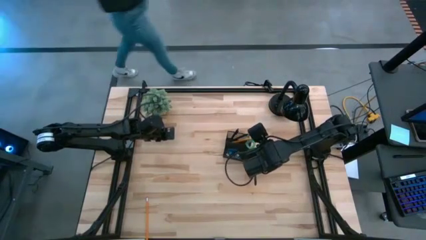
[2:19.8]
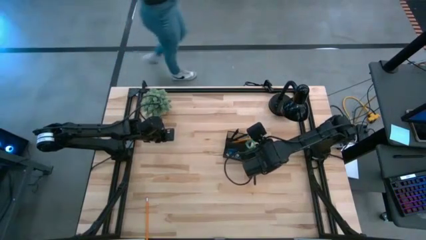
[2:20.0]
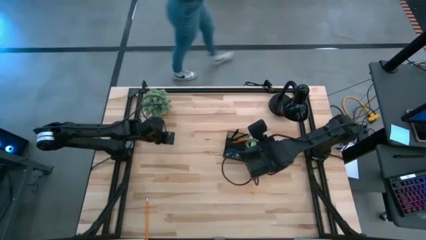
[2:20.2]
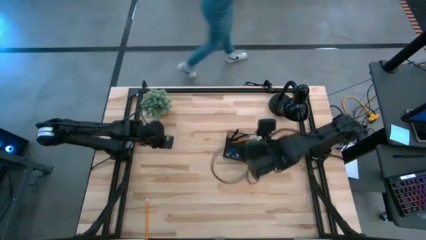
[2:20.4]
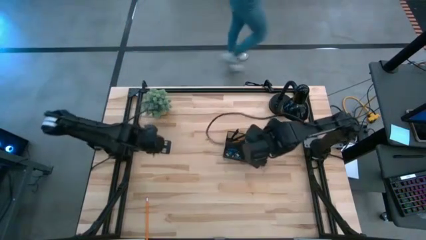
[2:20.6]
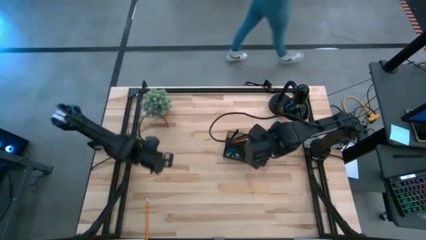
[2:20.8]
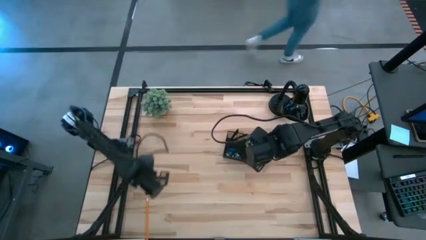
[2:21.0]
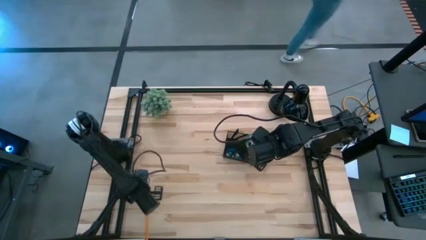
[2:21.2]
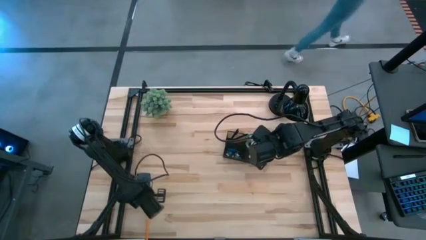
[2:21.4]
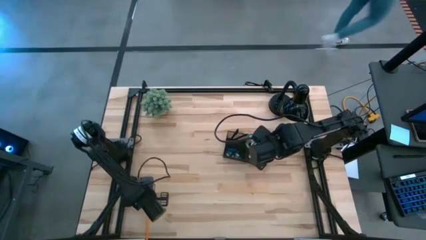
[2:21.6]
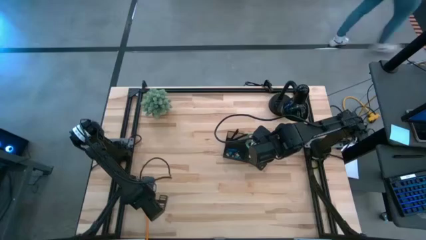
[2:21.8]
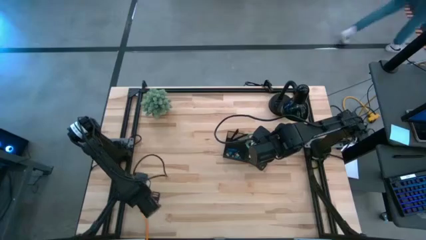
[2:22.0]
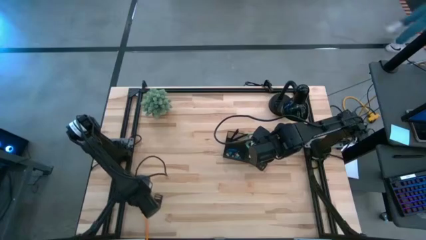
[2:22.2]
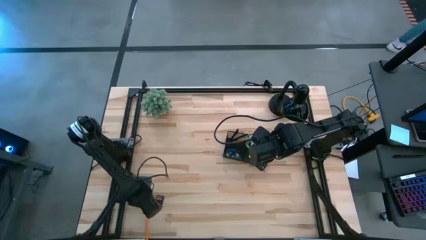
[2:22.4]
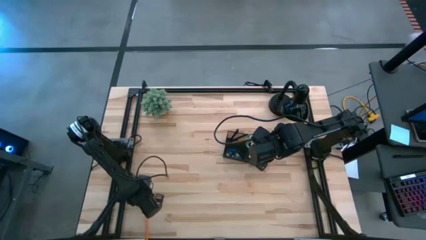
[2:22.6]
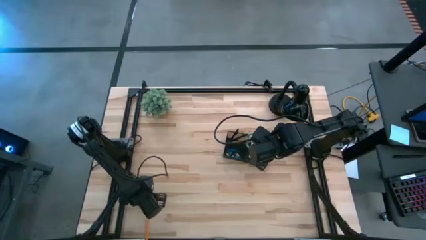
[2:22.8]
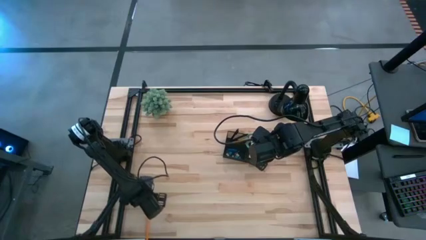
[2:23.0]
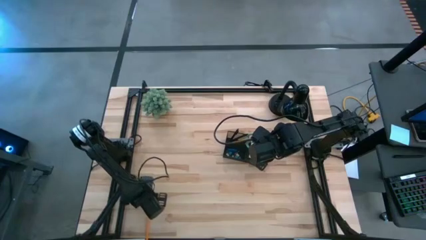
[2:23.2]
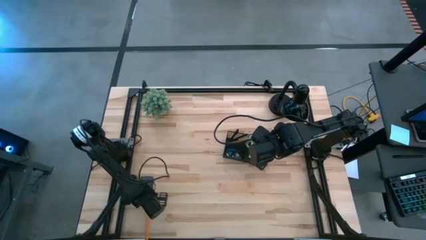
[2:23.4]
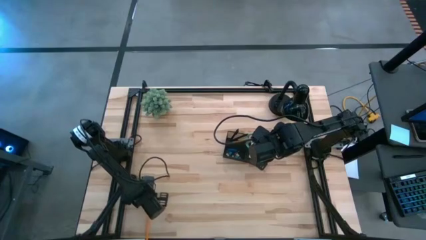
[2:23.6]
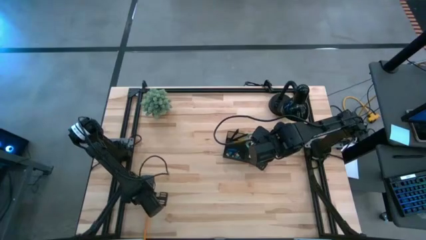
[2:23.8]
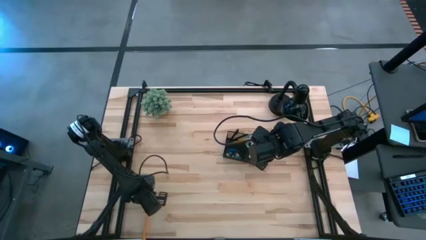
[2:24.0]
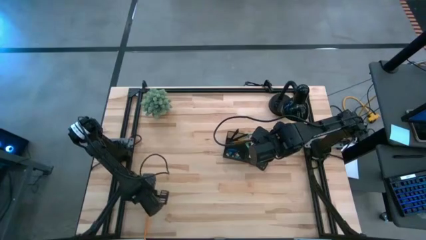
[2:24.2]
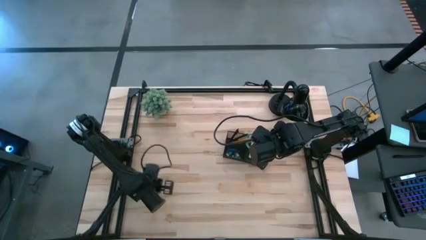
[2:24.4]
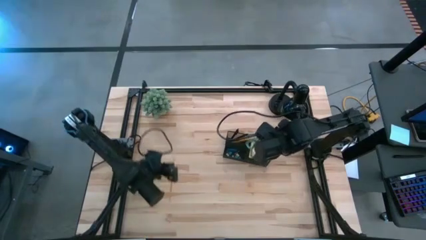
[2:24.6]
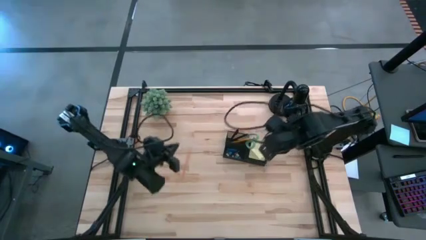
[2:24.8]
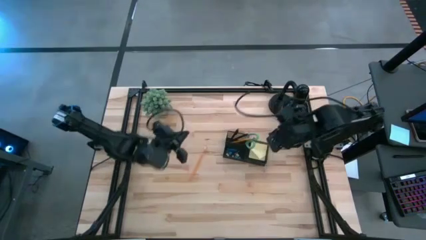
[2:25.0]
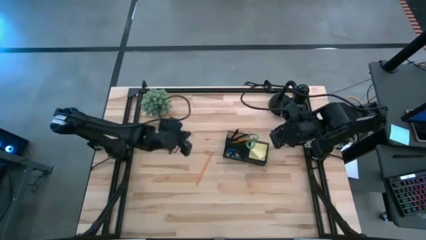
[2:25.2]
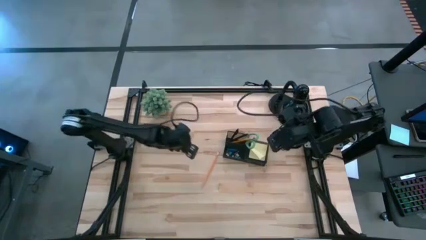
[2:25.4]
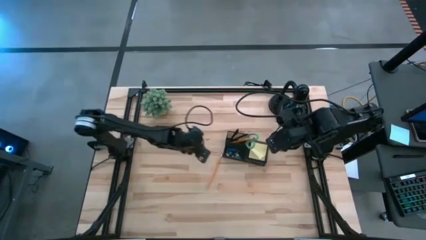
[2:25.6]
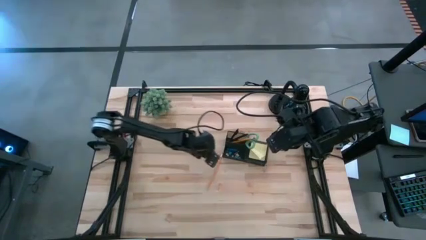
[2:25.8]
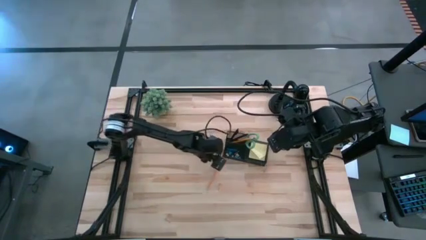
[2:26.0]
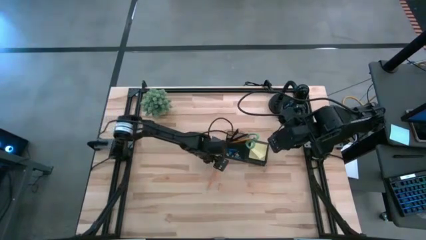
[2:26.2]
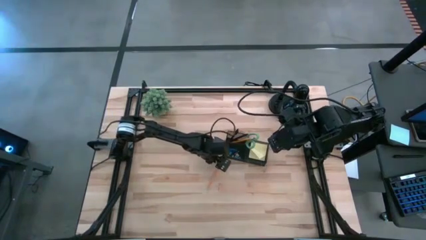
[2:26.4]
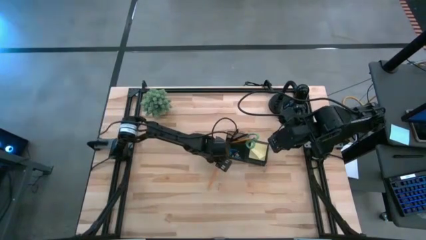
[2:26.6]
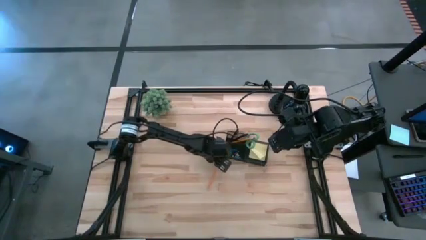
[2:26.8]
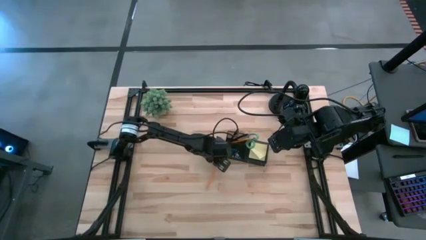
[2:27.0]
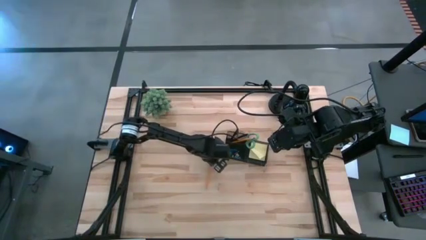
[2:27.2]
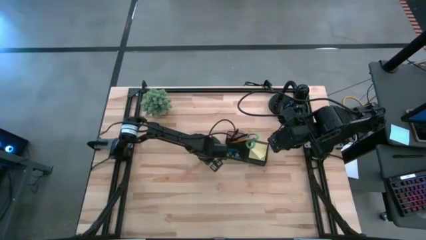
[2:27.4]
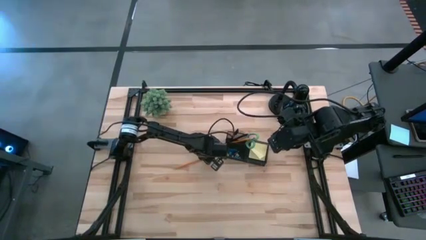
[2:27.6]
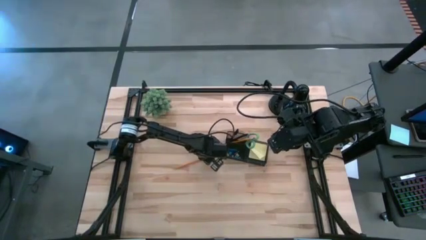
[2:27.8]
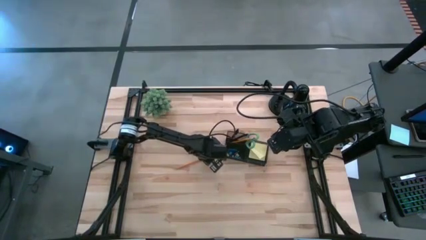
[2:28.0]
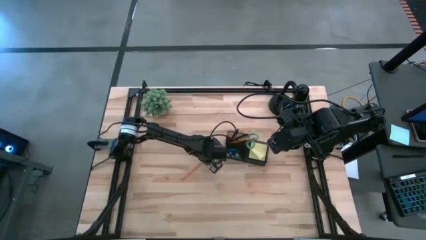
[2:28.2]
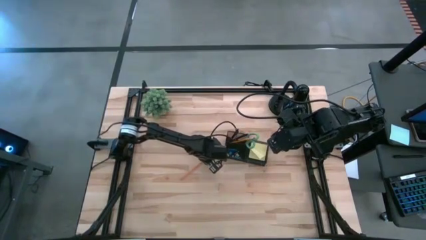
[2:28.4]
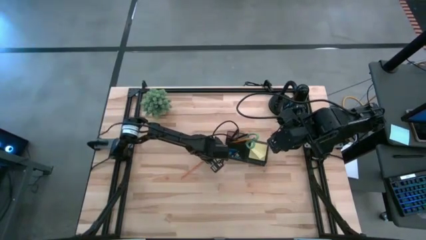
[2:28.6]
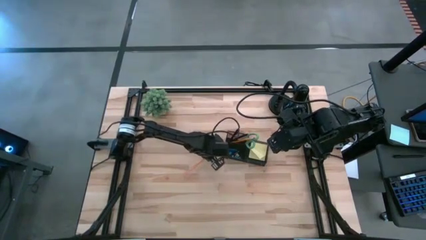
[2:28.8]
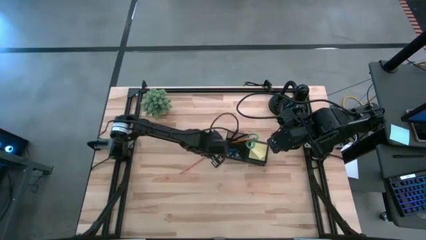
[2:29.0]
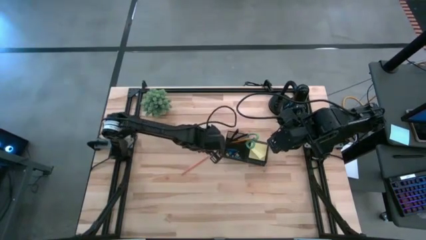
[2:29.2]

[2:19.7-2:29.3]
Task: Pick and place office supplies into organizer
Put the orange pencil into black mesh organizer

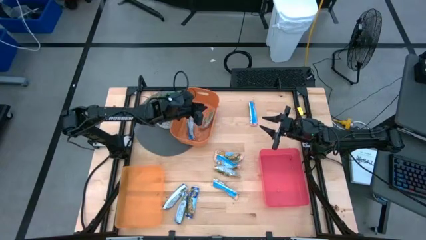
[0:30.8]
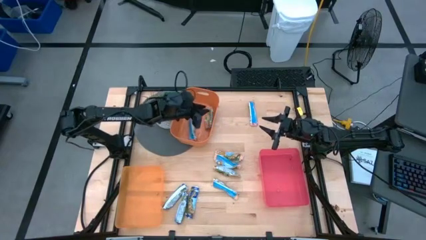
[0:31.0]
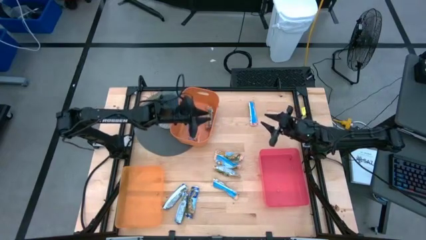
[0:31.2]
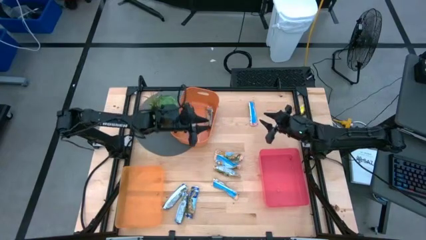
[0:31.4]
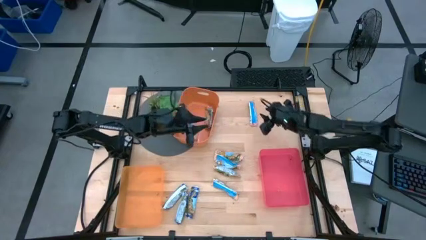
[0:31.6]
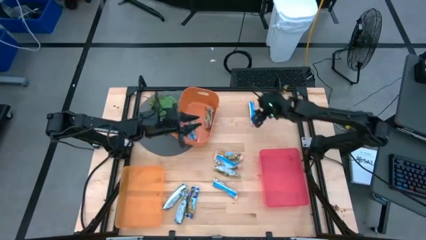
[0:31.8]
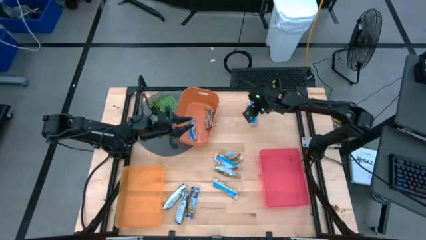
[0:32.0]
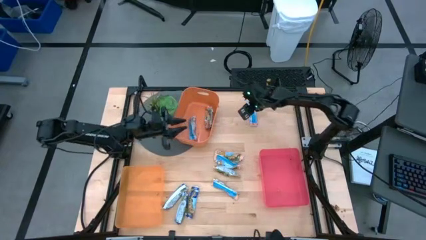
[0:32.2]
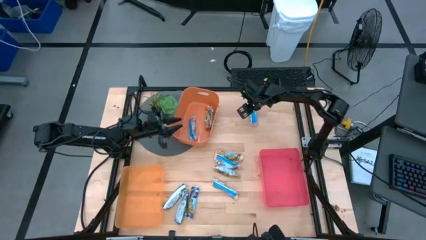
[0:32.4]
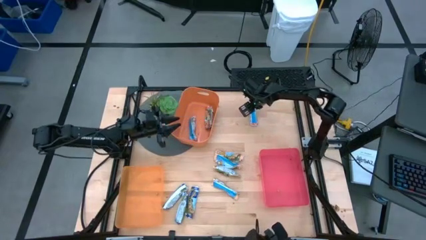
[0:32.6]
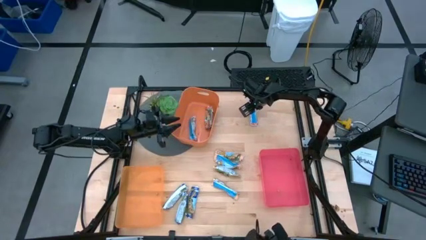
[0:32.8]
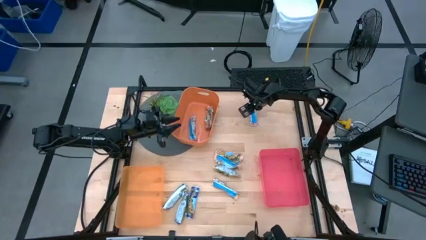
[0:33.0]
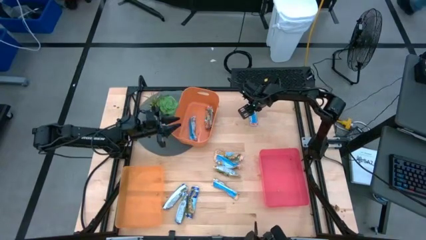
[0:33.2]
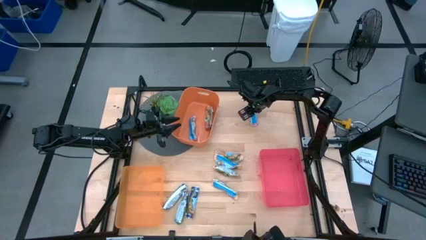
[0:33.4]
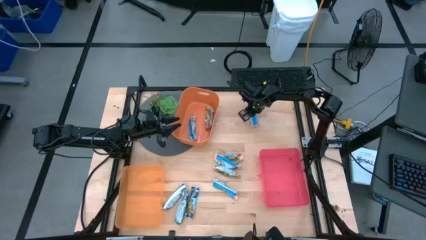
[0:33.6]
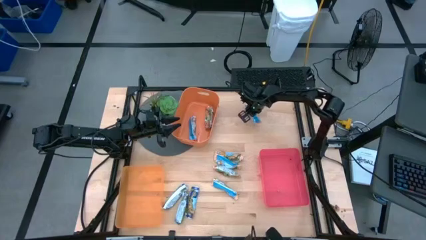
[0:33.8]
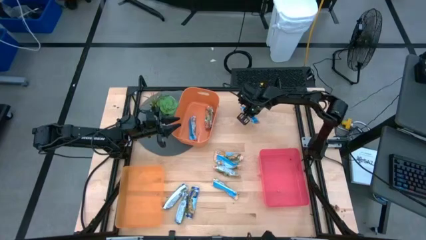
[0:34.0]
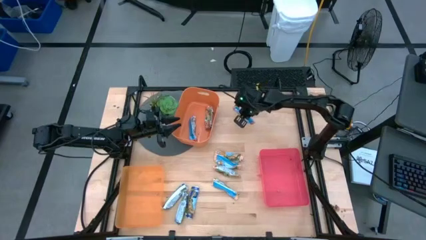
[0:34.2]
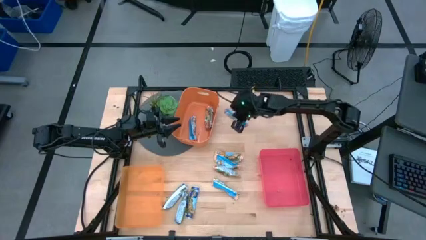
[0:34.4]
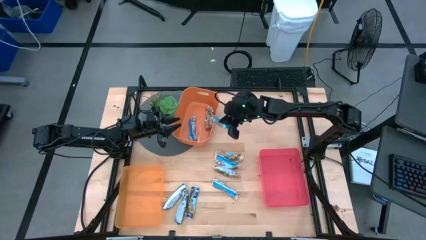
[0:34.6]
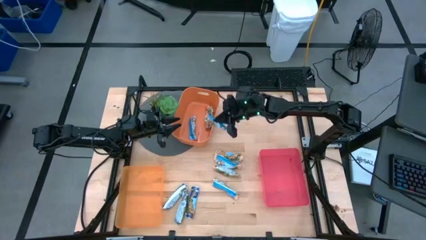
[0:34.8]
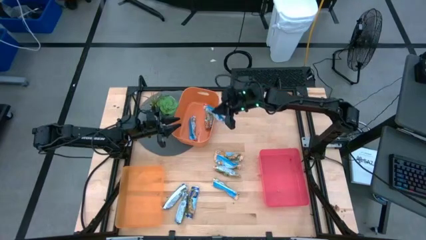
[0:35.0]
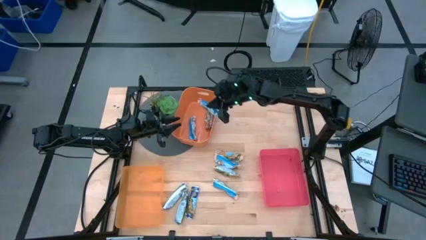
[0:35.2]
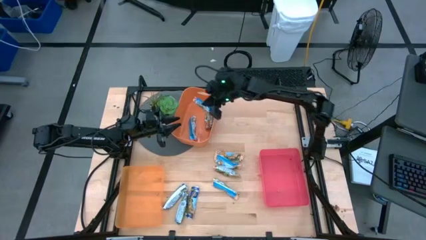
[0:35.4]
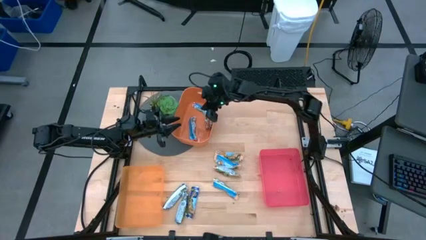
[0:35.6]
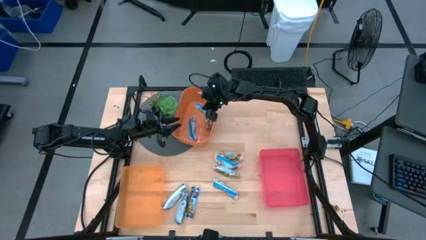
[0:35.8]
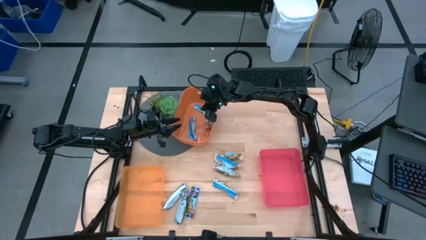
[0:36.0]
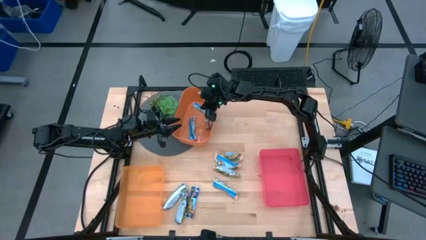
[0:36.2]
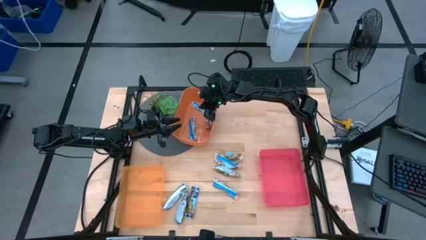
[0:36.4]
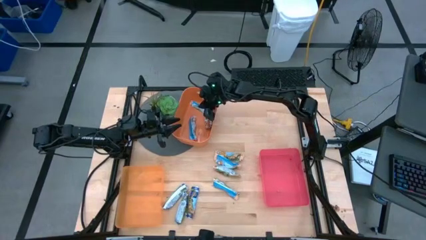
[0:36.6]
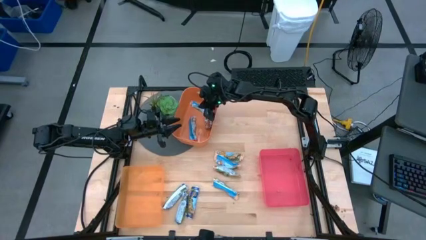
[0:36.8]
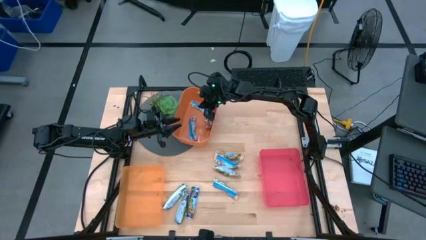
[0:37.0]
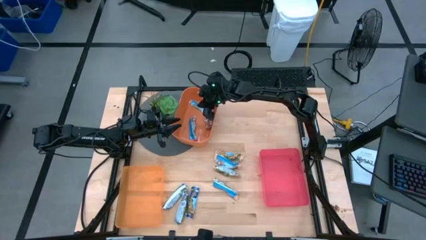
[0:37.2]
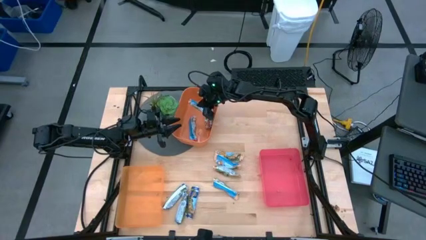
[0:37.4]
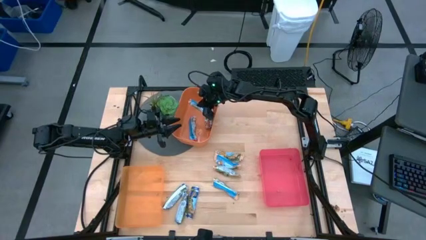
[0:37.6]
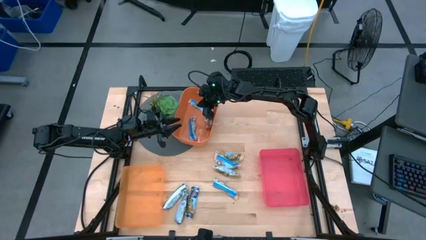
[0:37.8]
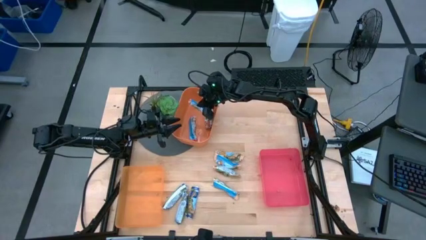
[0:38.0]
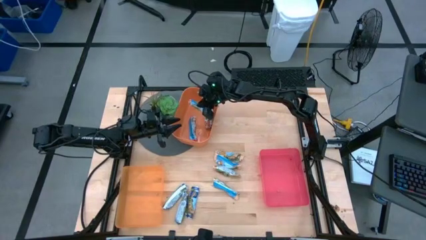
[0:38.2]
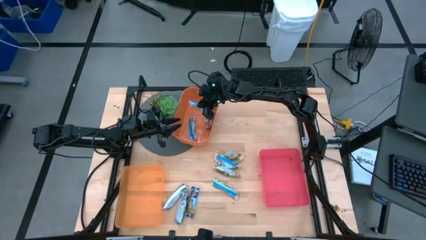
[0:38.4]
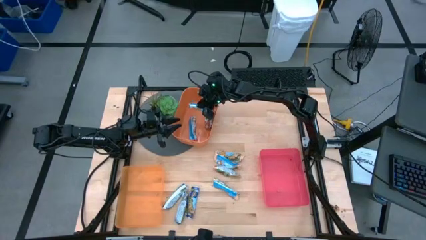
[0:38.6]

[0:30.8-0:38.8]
Task: Pick and place Granola Bars by type
Put the red granola bar into the orange bin
